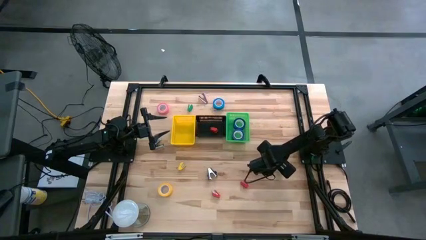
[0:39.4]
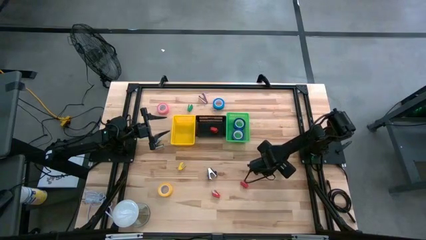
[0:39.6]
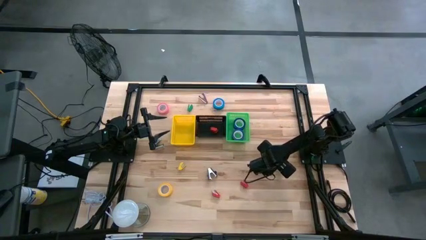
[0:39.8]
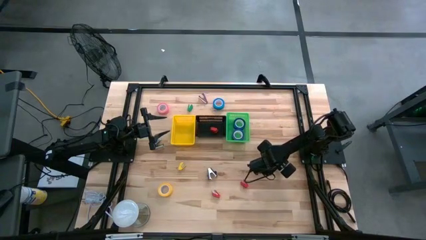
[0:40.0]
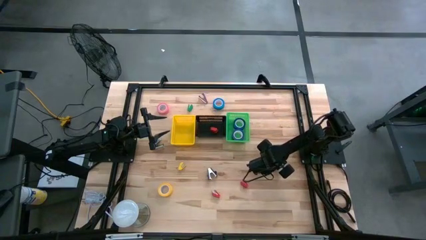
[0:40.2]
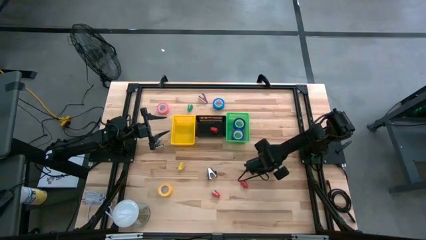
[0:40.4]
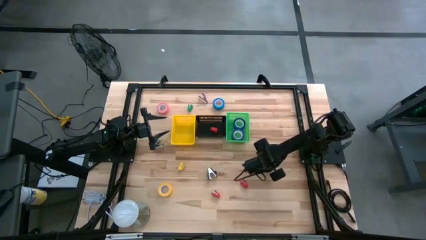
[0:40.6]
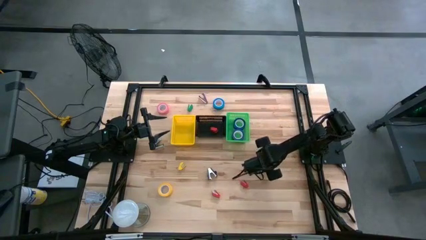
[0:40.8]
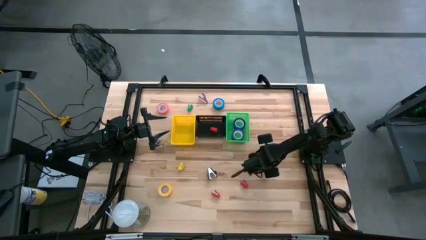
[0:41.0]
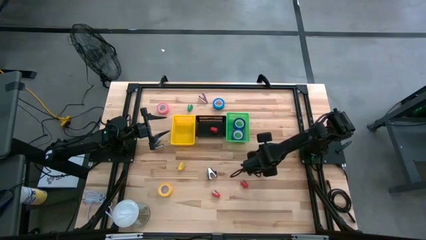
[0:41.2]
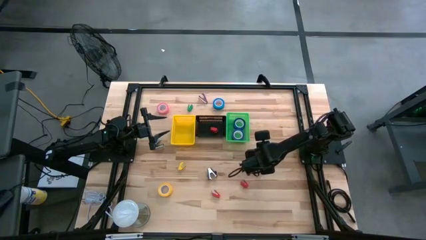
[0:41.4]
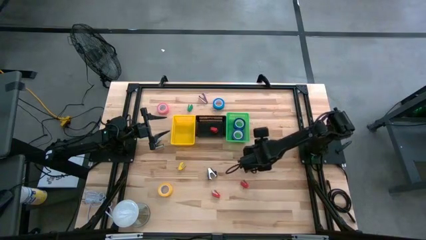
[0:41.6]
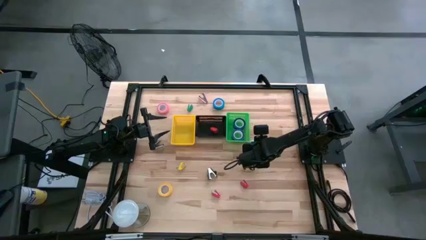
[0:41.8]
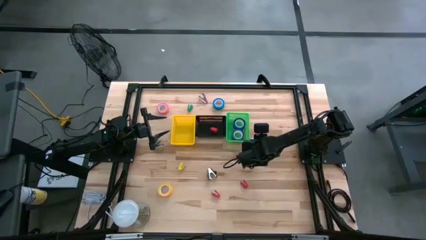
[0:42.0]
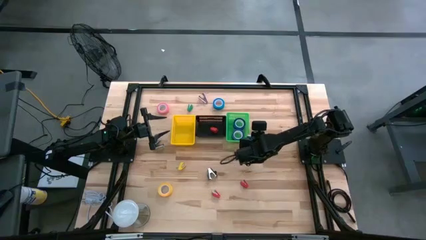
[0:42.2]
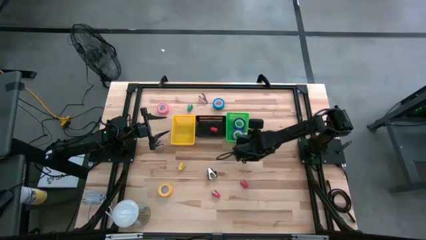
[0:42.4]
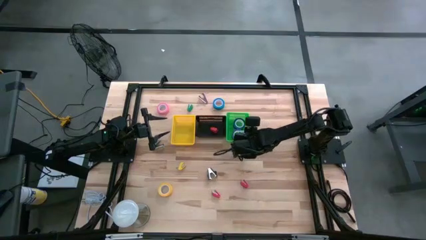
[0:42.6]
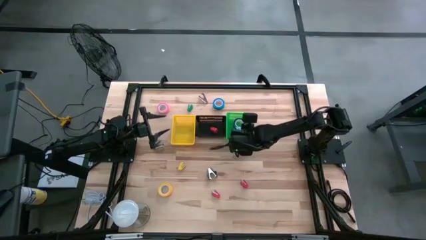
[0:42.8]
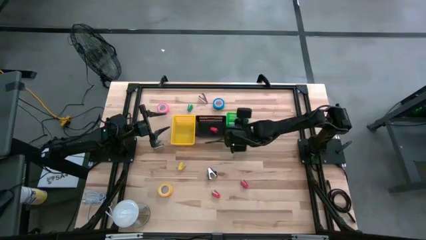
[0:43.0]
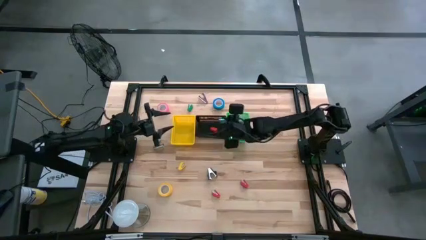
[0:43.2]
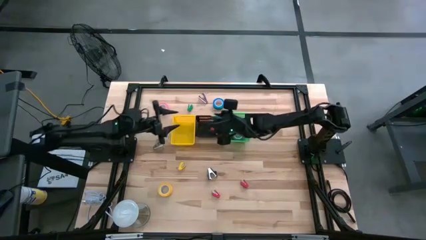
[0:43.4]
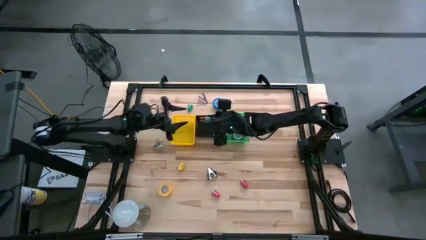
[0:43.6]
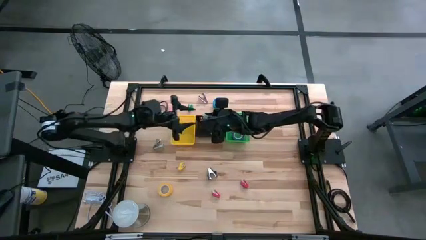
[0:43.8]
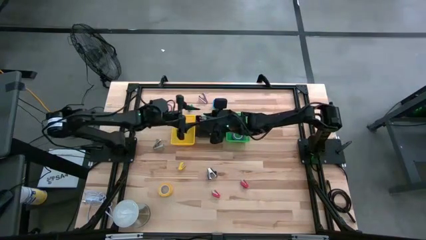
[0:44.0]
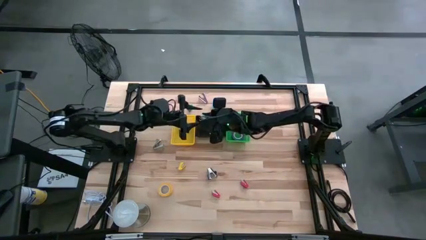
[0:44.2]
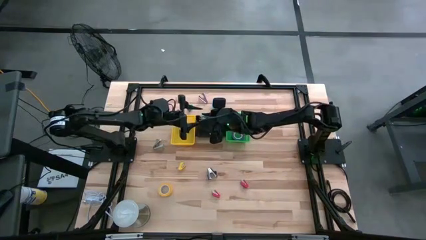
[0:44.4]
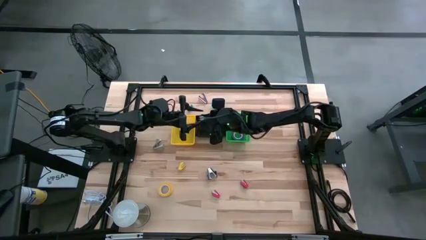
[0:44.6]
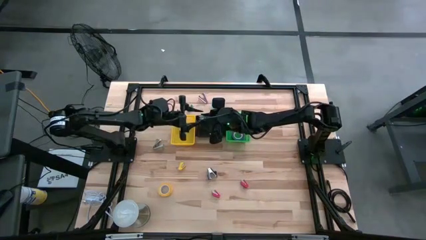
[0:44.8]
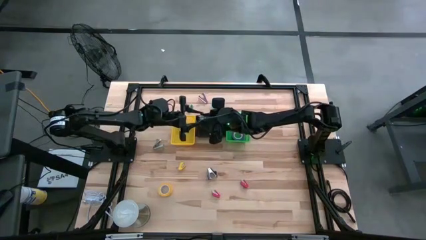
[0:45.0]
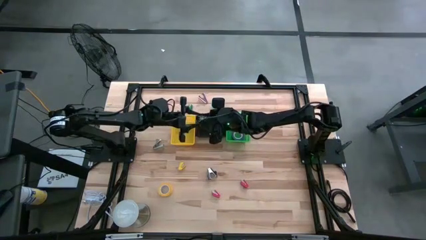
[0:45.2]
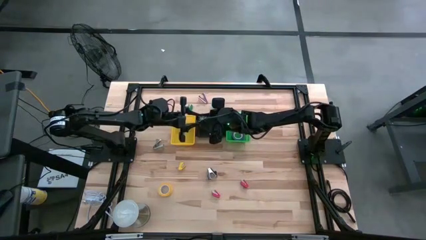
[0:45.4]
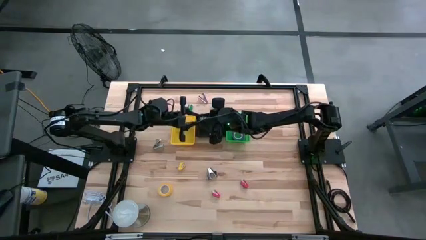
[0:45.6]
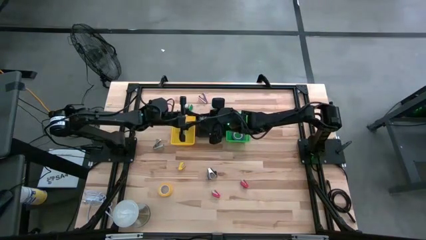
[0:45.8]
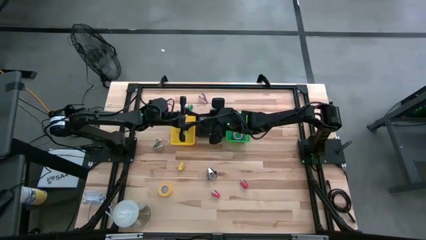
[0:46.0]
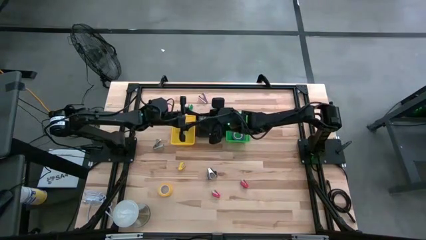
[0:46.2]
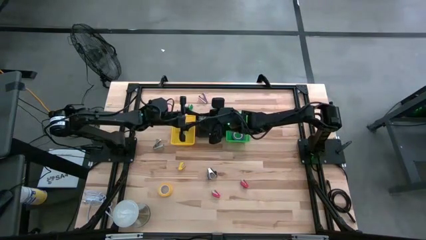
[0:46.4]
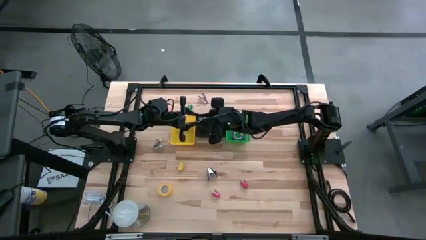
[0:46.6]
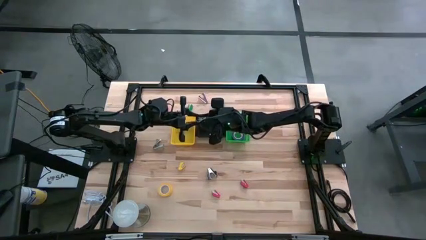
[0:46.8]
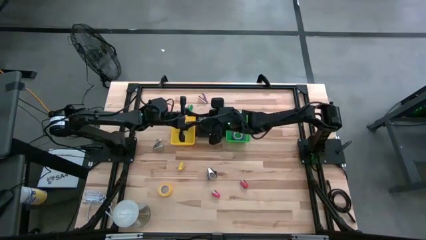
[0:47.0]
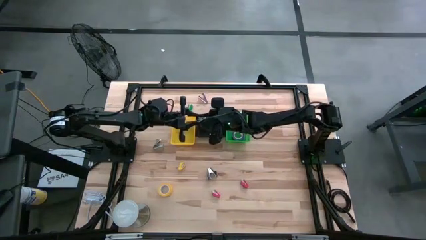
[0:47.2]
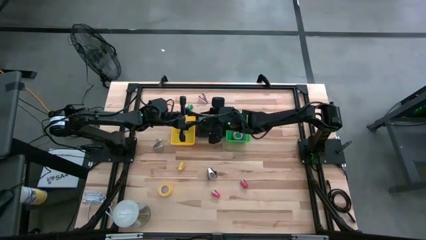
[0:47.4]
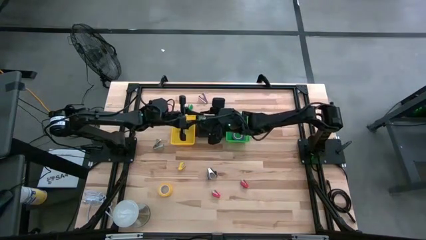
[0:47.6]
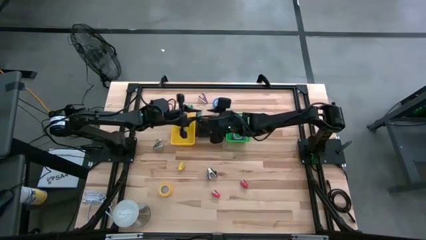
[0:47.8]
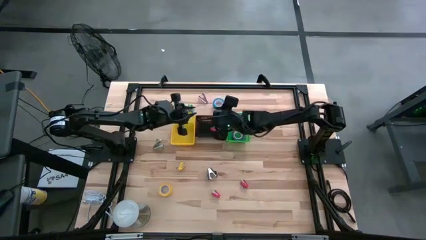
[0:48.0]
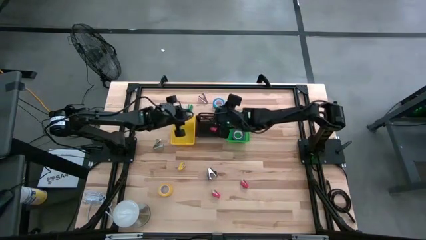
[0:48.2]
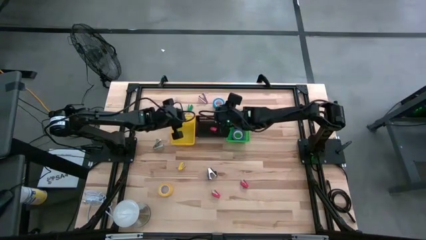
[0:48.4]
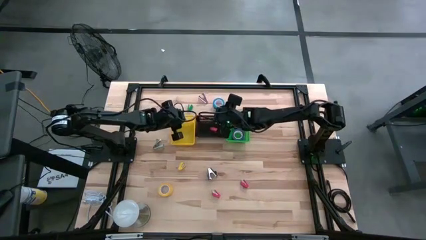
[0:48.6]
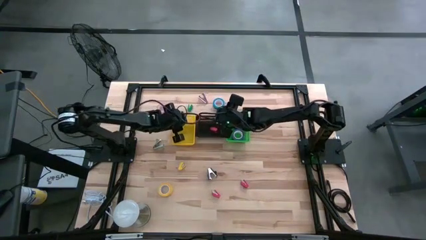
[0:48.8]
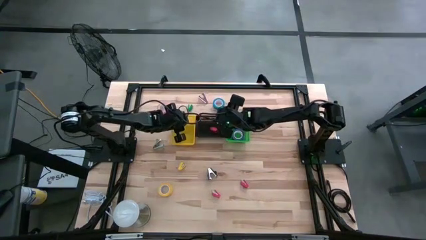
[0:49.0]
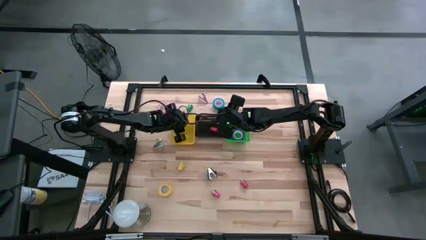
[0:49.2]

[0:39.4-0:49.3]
Task: Pick and place Stapler, Stapler remover, tape
Put the blue staple remover into the yellow bin

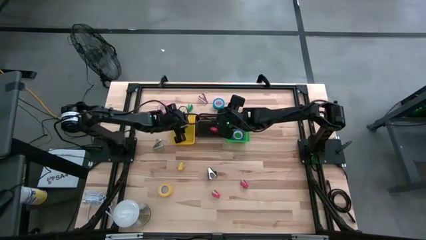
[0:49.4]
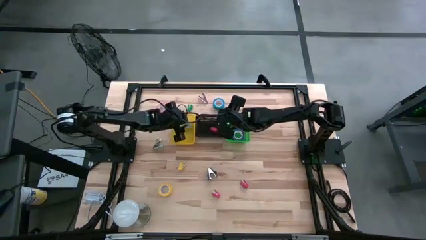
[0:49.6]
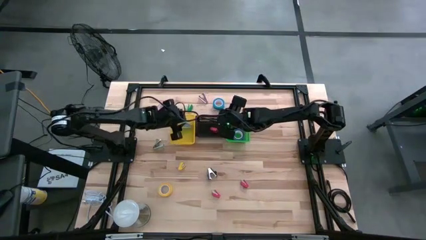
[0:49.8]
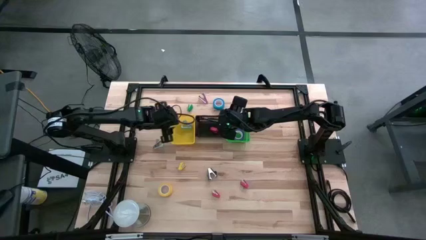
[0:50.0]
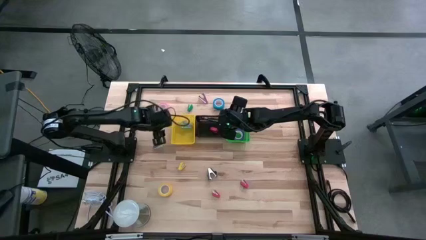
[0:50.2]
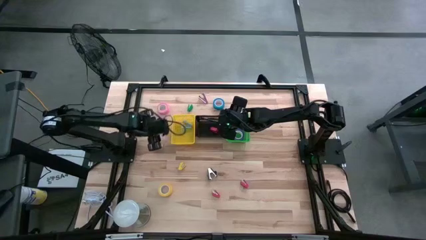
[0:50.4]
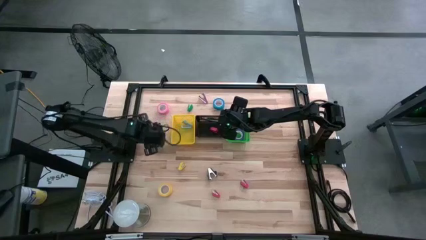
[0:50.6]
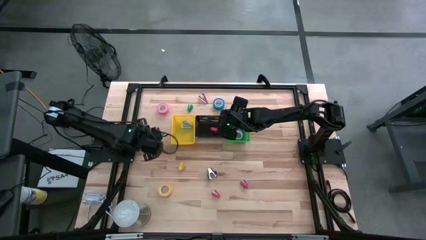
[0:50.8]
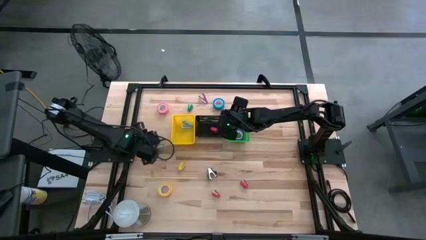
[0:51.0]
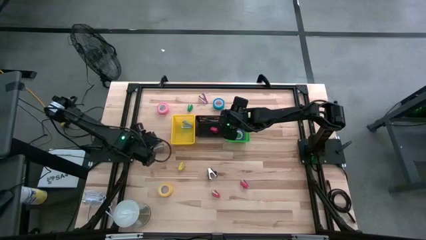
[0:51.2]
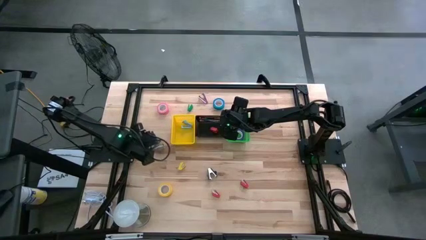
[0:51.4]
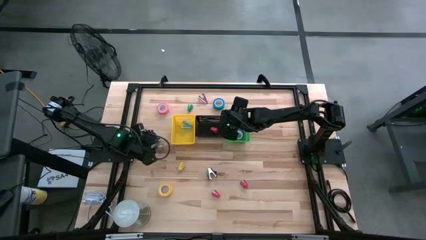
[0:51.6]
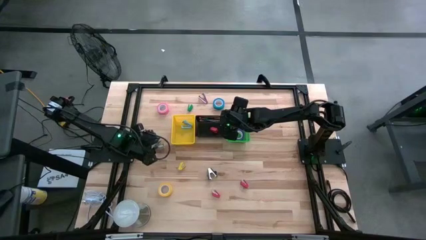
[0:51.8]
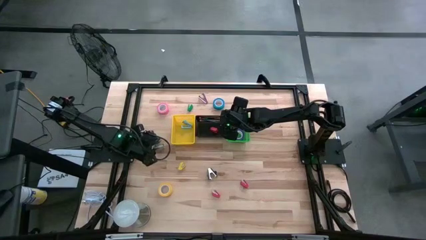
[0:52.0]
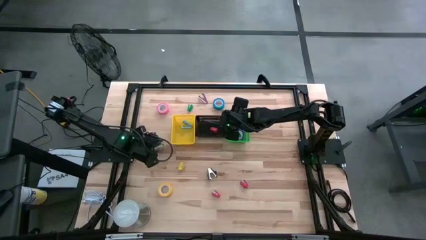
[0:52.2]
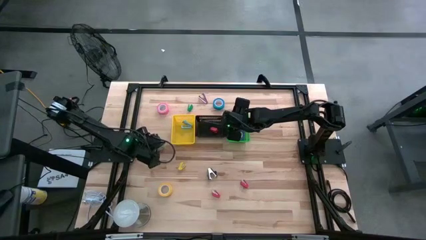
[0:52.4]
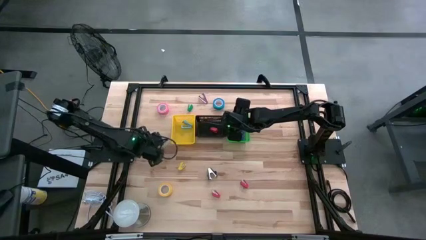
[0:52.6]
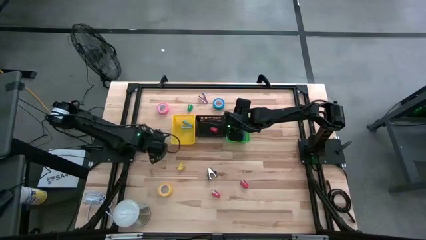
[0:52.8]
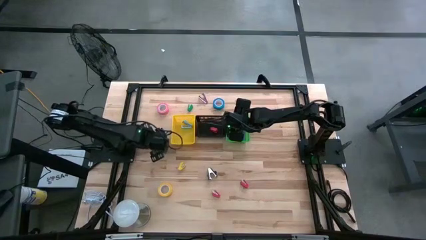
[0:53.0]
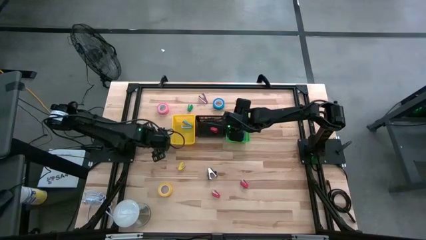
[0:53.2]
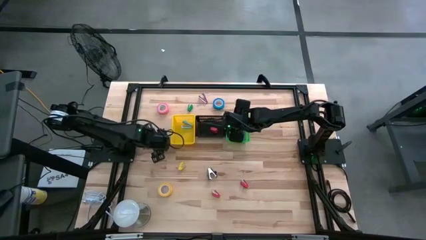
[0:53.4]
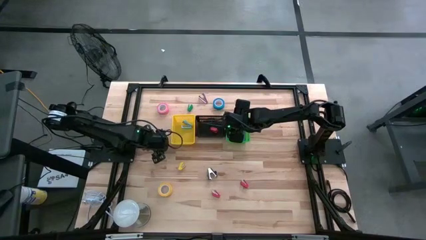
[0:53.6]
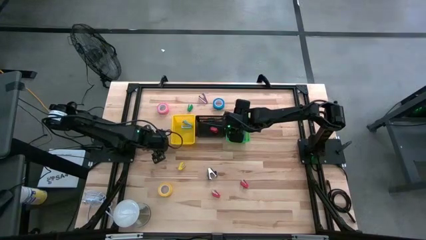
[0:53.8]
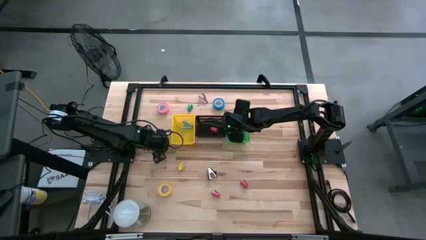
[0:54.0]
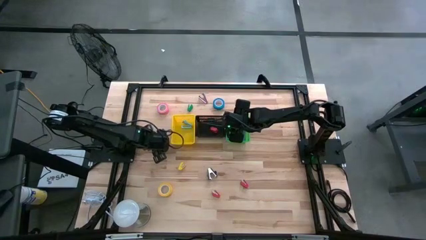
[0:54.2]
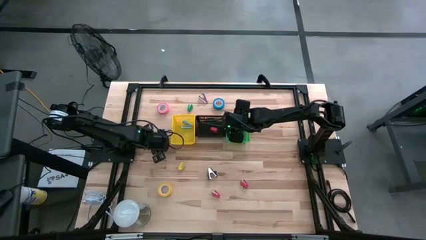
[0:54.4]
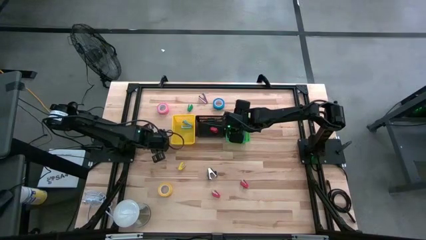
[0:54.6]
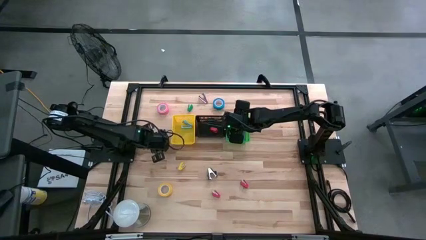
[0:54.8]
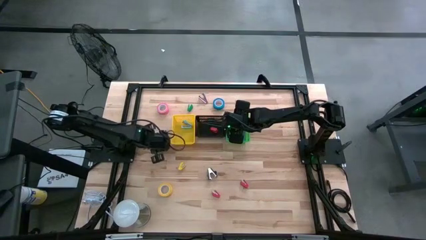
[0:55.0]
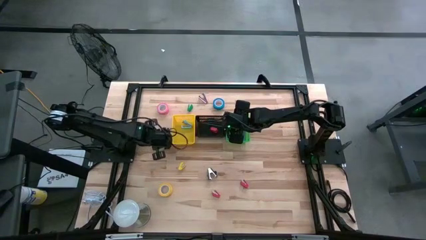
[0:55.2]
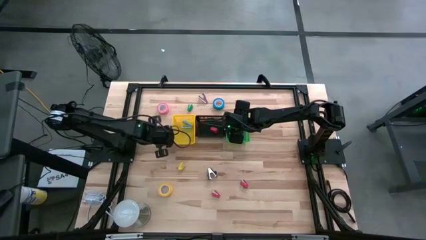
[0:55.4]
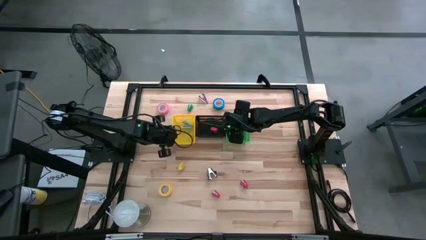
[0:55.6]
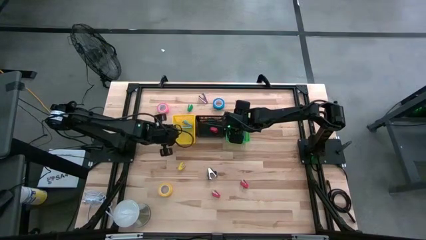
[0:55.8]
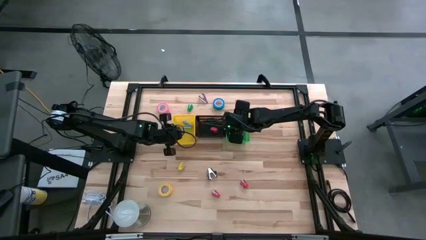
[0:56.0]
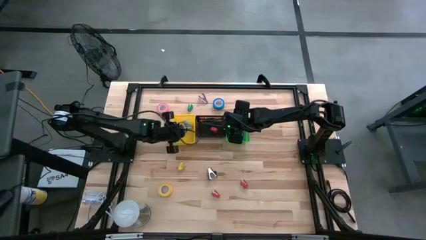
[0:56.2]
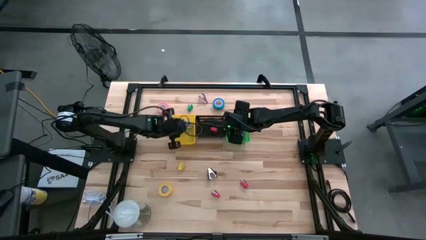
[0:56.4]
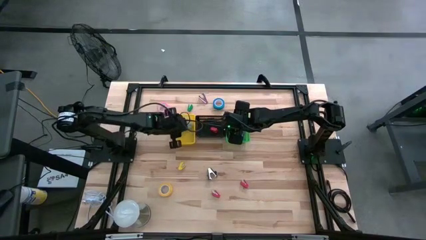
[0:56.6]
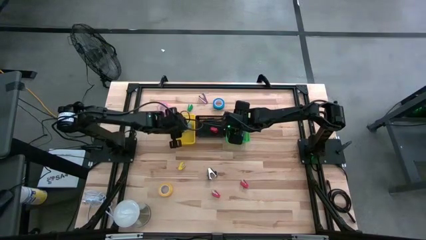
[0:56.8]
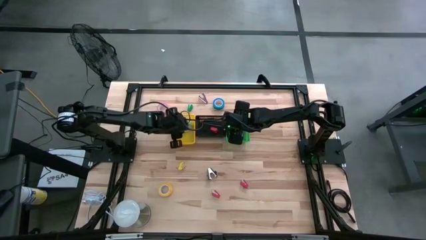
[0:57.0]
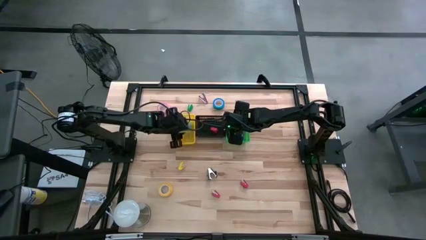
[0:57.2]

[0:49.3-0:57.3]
Put the gray staple remover into the yellow bin
